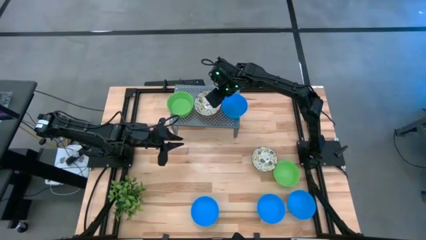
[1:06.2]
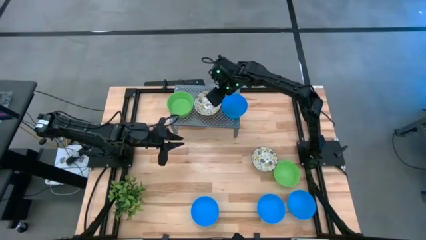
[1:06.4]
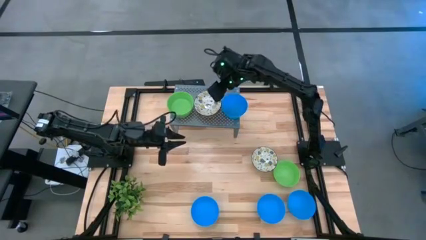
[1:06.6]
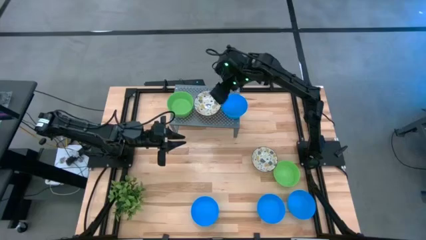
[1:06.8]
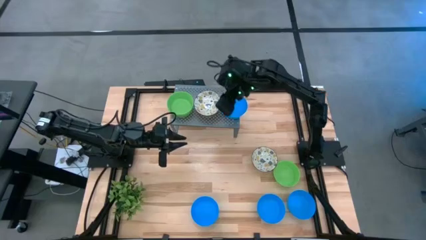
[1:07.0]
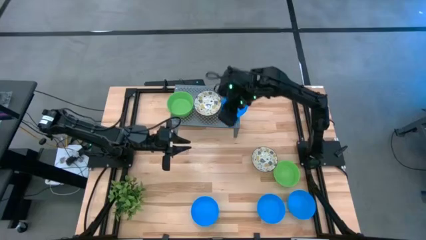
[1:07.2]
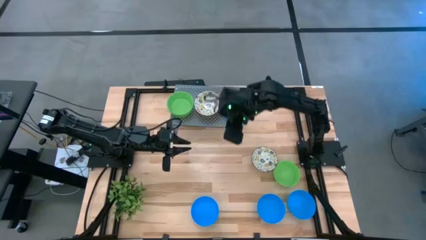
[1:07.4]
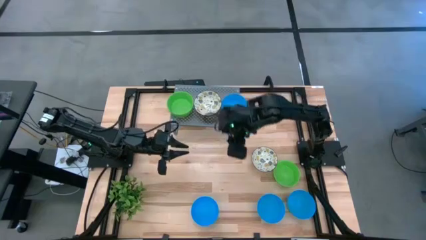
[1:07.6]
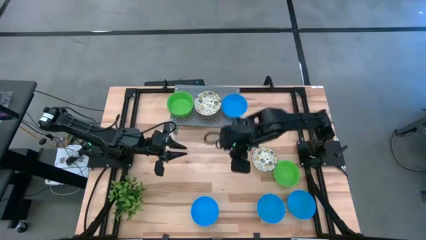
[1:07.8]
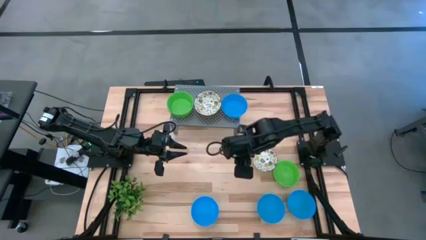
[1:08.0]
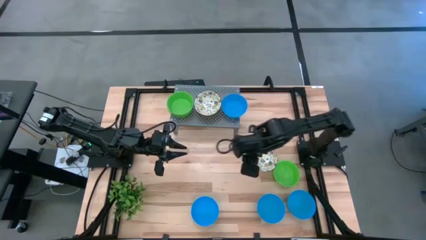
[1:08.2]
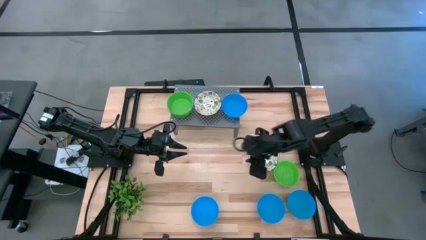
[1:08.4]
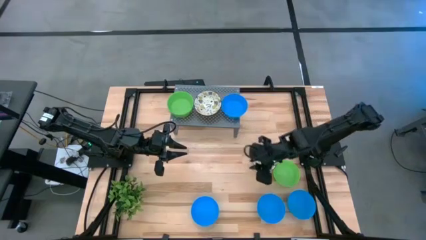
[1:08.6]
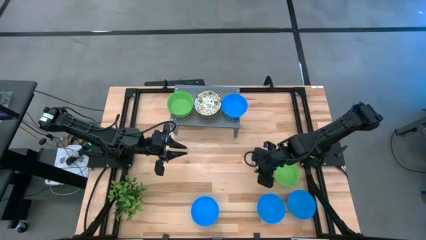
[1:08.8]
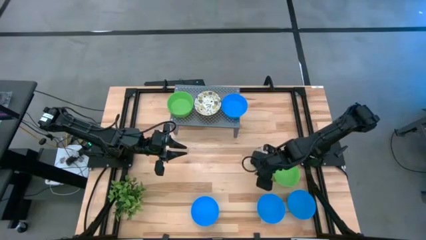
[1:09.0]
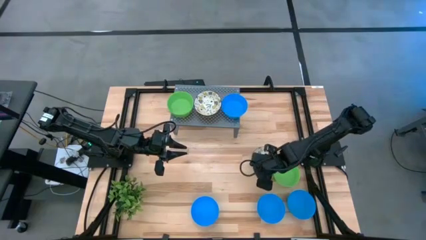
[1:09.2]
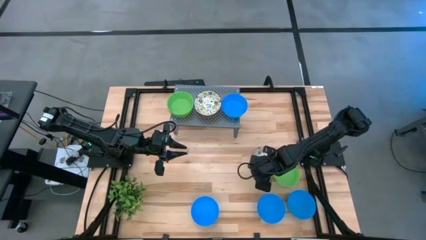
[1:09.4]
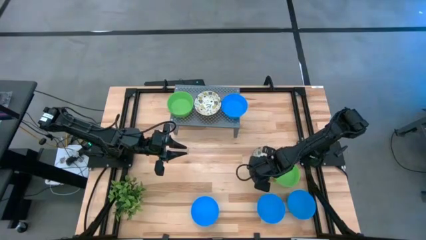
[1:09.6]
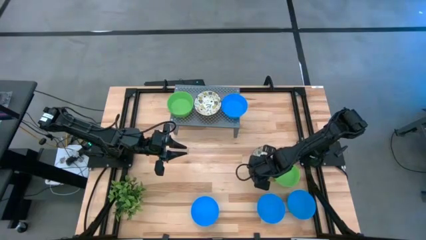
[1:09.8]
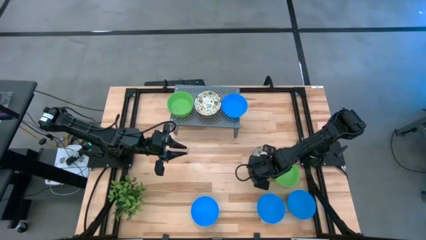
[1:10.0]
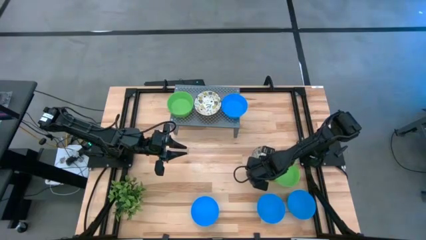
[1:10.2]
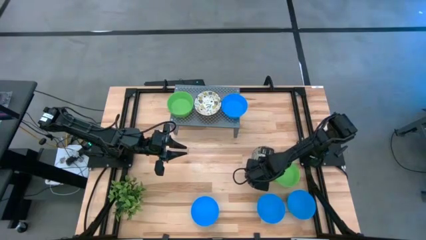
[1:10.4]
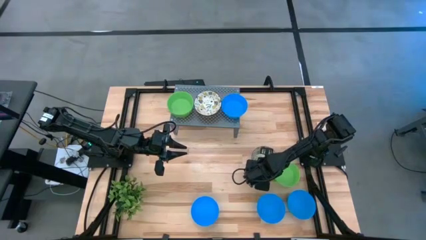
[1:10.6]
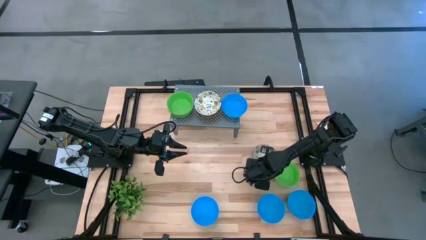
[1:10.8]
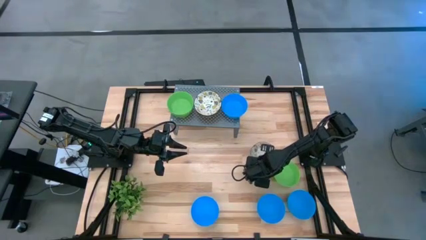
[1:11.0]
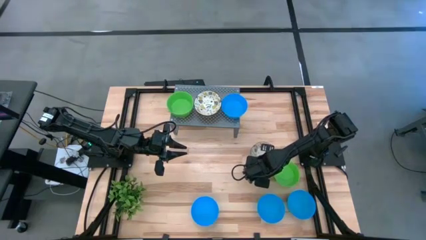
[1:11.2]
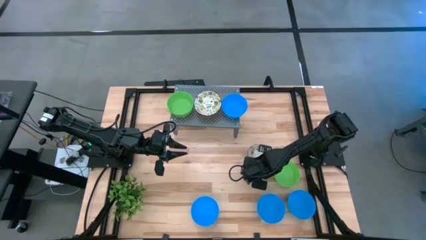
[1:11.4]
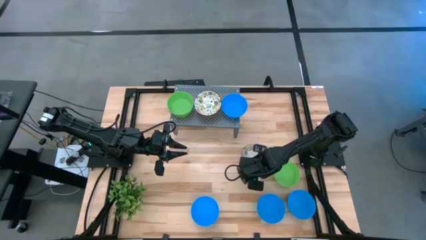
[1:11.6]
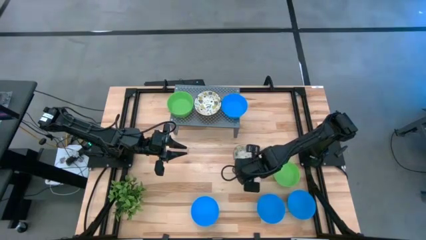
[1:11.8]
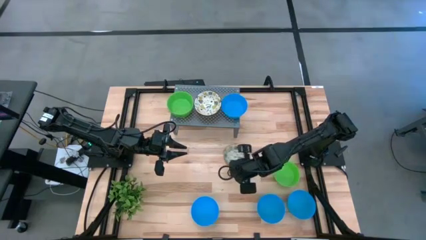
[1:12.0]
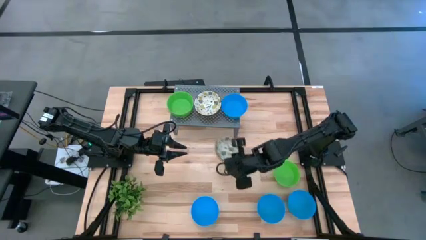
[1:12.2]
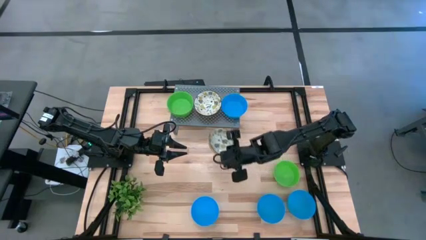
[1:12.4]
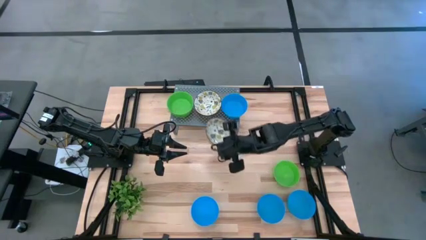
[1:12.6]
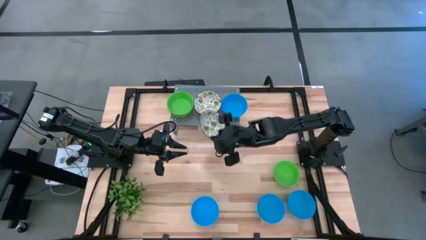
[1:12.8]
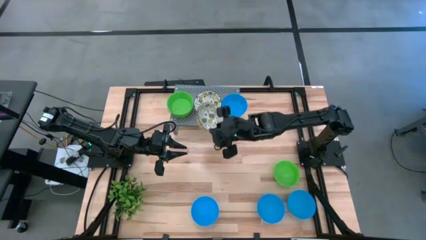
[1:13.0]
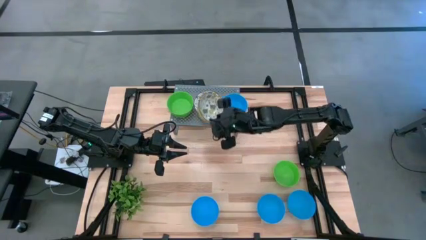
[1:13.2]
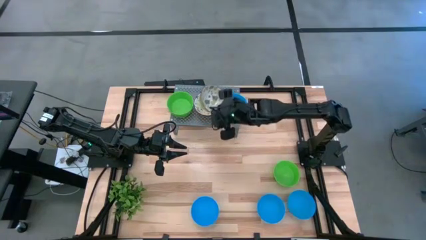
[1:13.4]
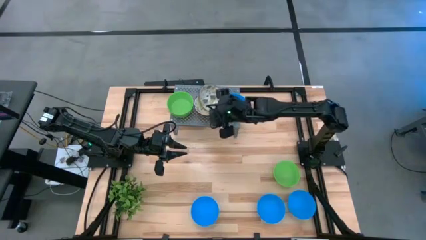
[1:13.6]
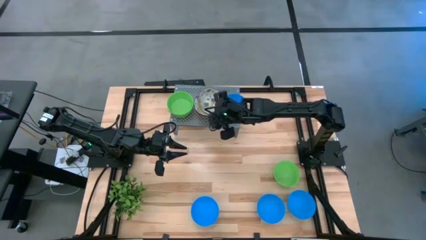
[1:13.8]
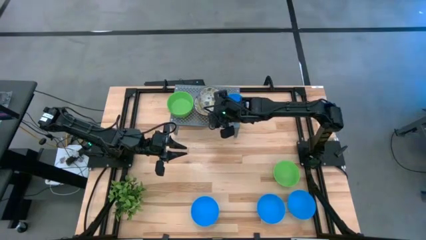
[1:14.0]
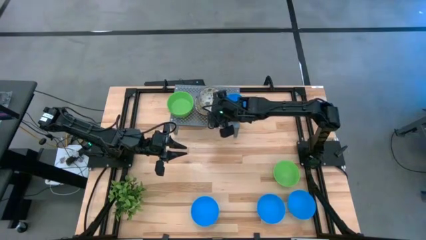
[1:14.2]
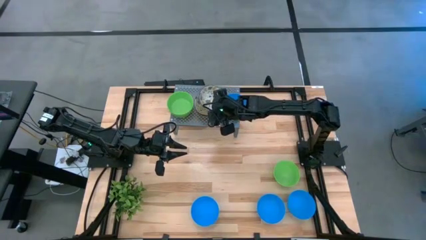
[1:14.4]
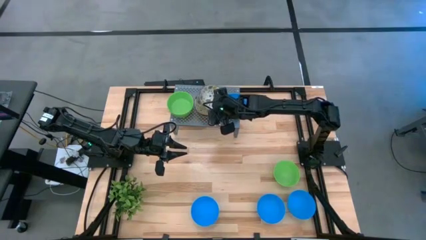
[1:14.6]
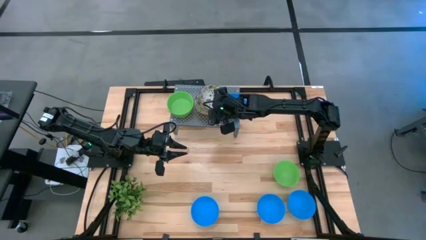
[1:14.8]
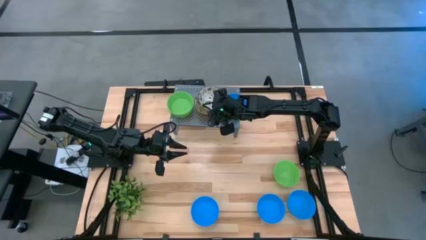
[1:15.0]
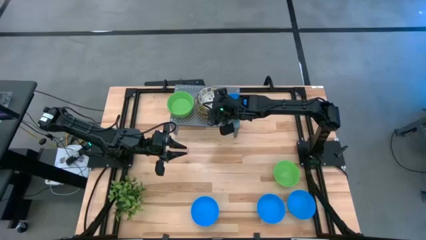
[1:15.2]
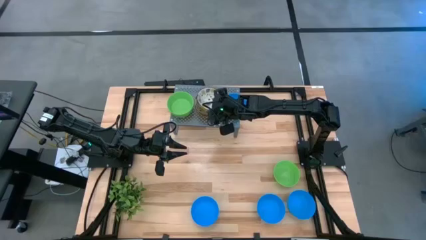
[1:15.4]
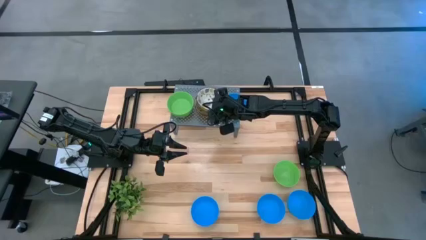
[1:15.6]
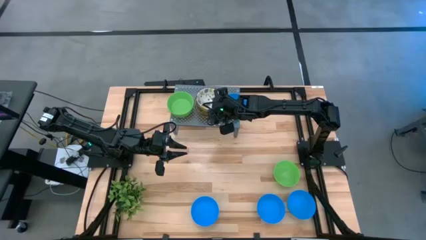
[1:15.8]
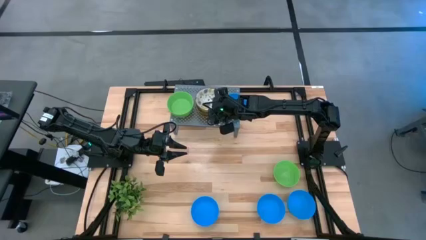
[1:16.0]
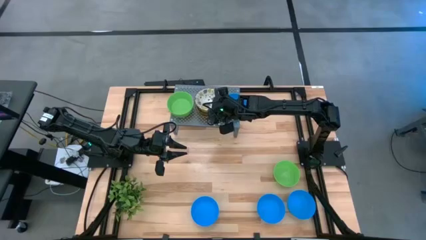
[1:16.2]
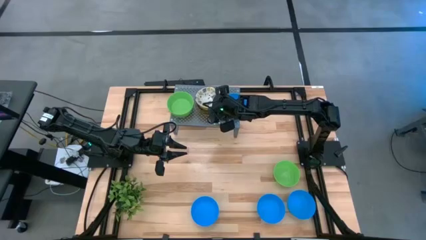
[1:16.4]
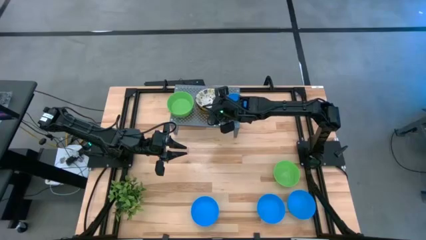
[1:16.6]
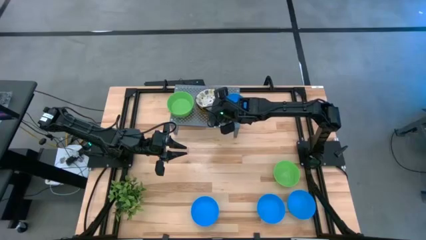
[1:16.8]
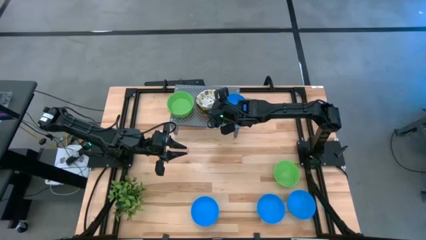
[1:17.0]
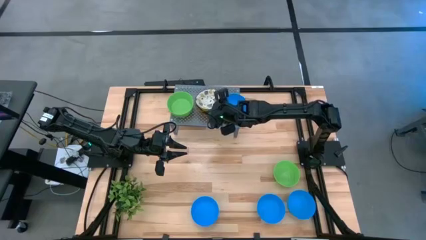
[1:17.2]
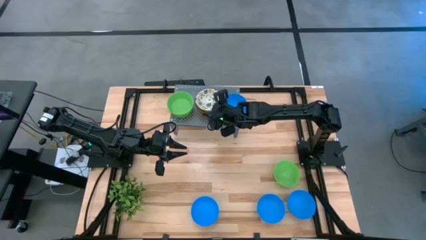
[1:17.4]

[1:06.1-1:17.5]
Task: Pick & Place Mini bowls
Stack the white patterned bowl on top of the other white patterned bowls on the shelf
